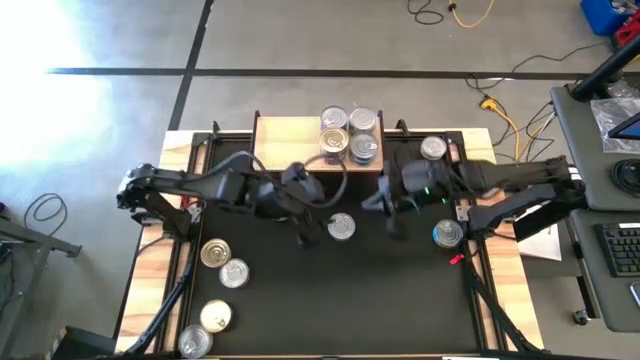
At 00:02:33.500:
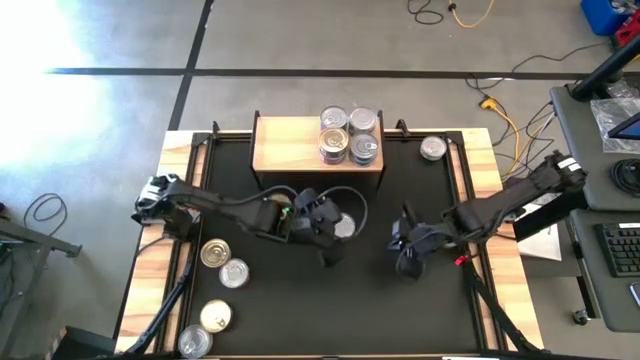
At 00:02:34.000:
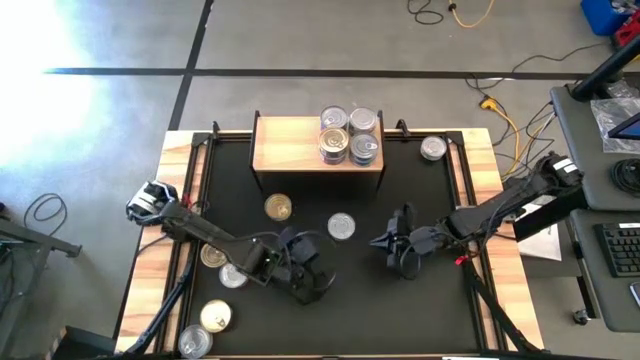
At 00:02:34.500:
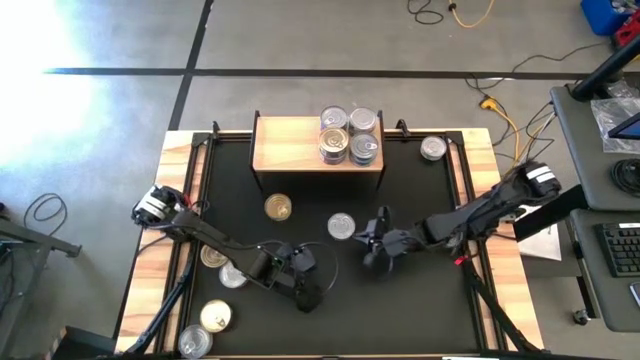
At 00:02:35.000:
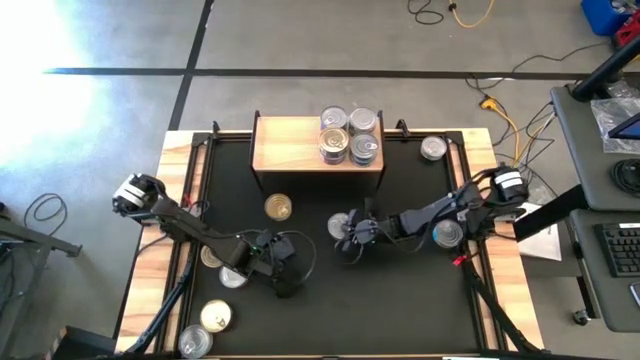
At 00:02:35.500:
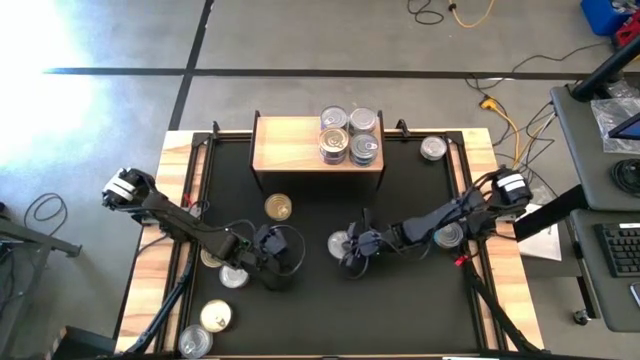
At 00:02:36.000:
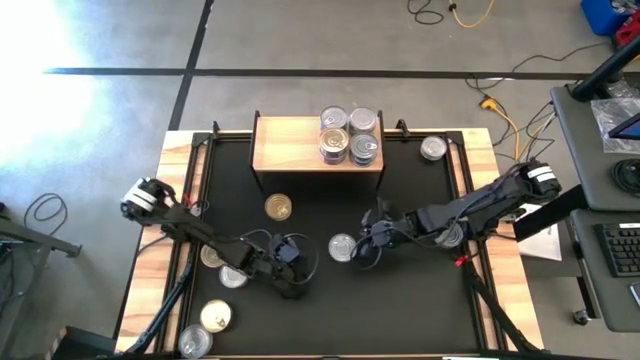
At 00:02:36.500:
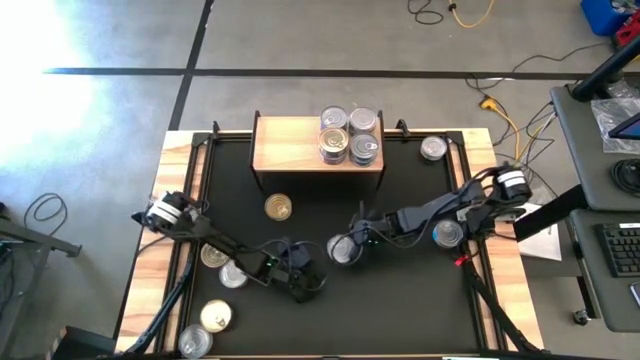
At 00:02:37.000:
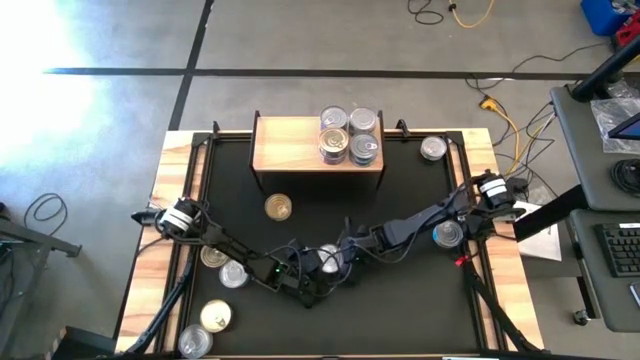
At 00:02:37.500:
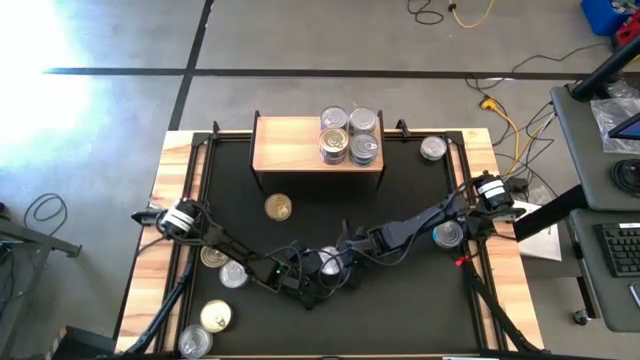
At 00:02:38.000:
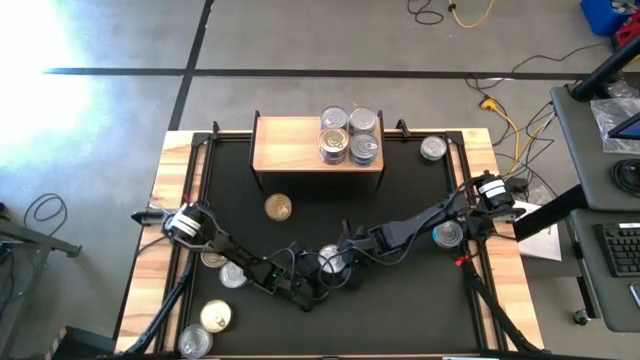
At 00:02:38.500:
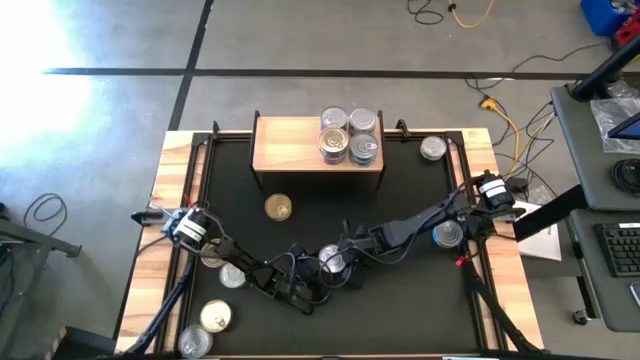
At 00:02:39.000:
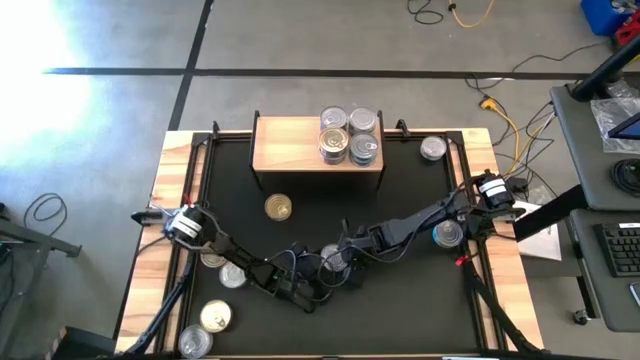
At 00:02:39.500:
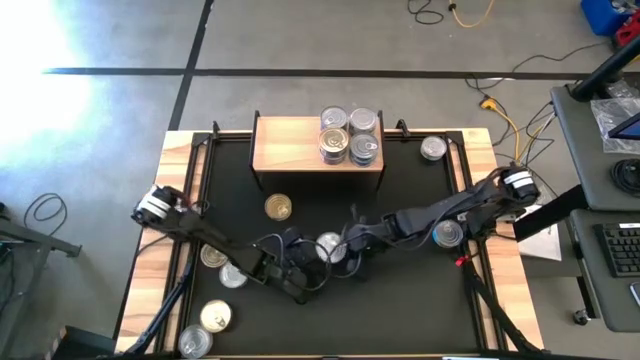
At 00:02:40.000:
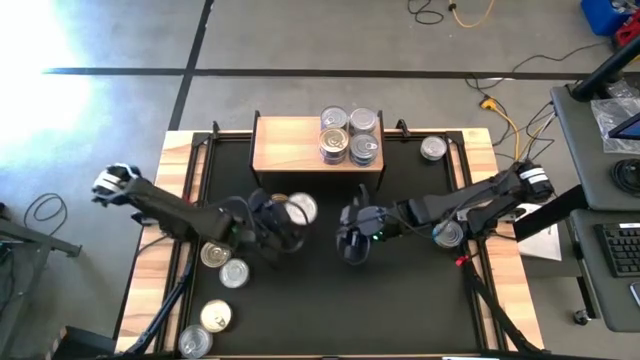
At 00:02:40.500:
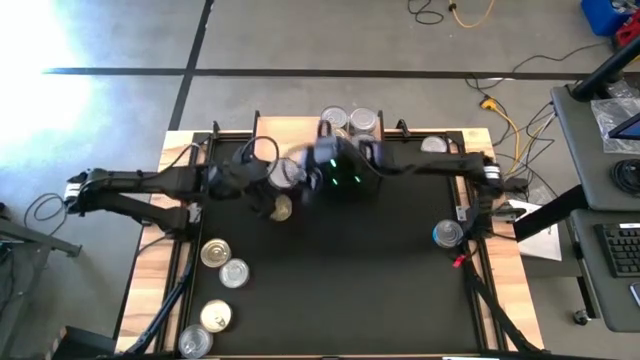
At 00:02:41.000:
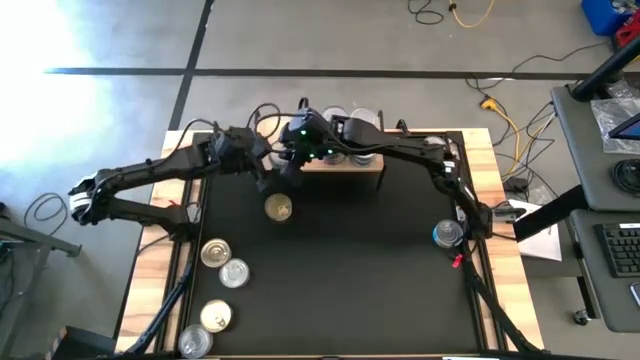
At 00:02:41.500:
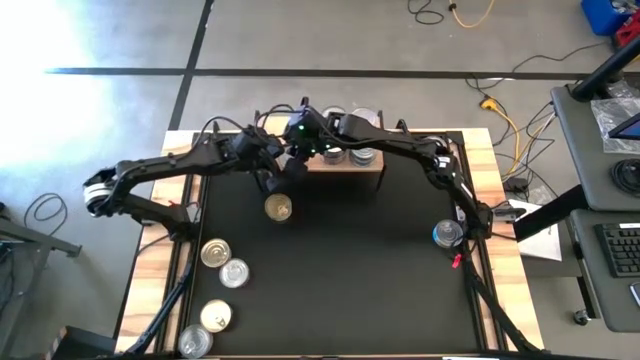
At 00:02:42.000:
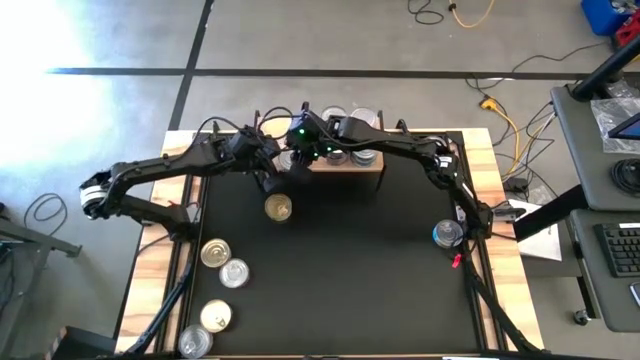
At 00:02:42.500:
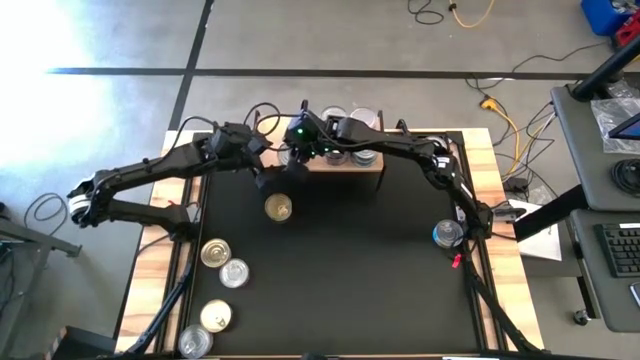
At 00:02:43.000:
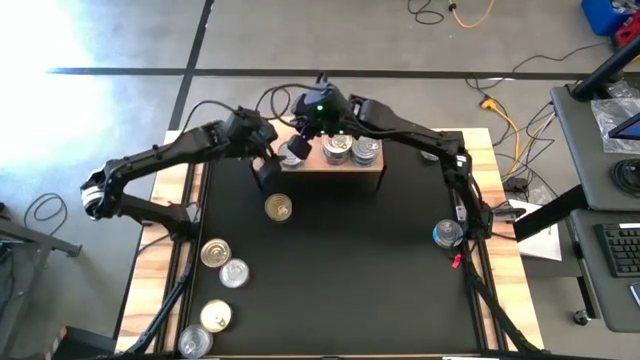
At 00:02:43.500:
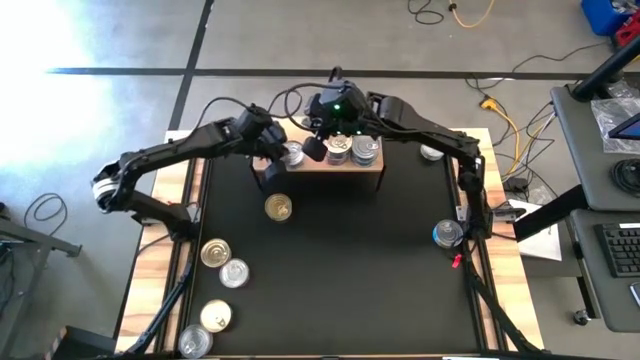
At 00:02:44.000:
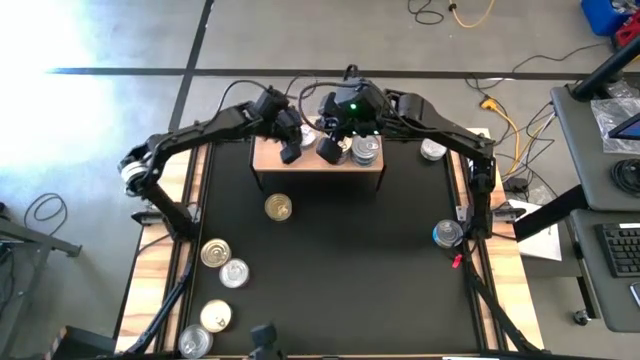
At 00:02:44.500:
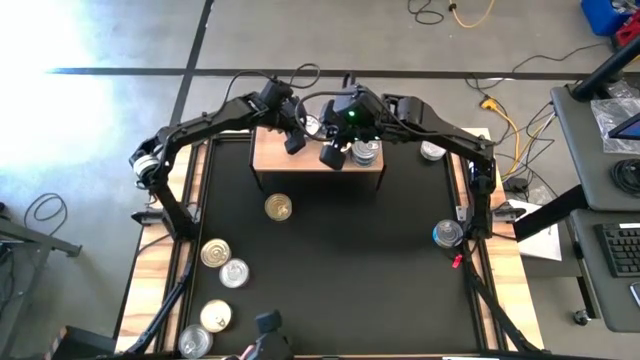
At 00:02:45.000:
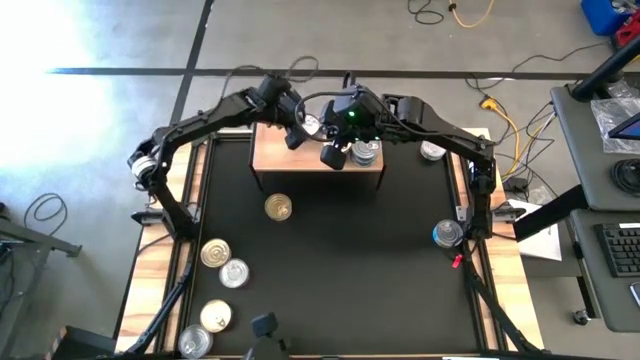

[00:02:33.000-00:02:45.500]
Task: Stack canned seafood by type on shelf
Put the right green tuna can on the shelf

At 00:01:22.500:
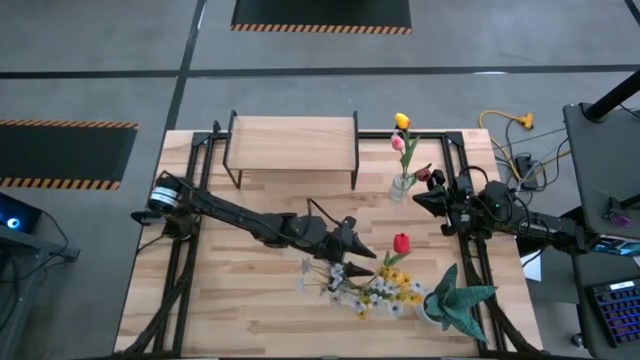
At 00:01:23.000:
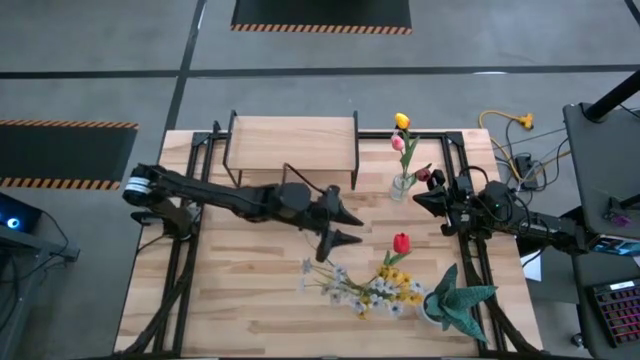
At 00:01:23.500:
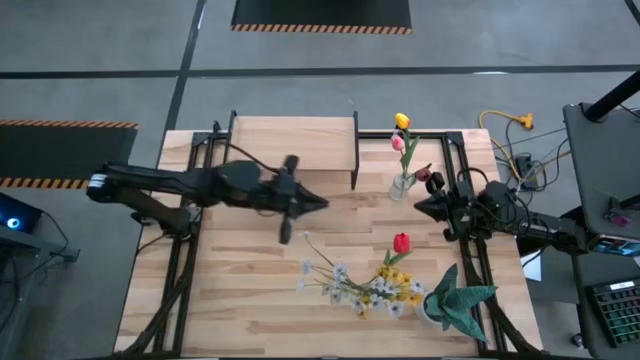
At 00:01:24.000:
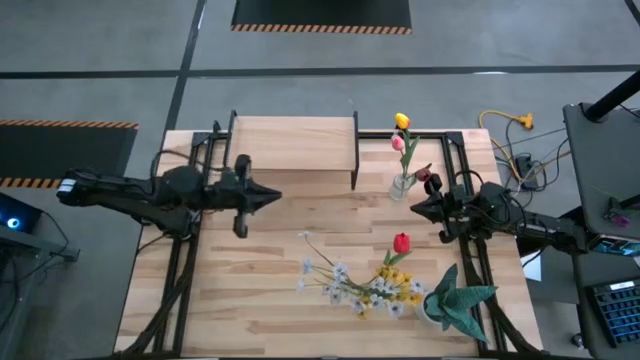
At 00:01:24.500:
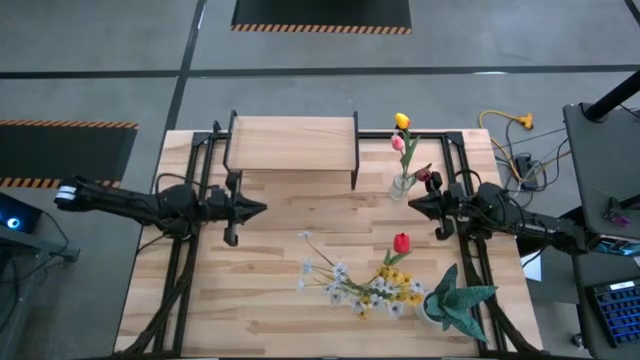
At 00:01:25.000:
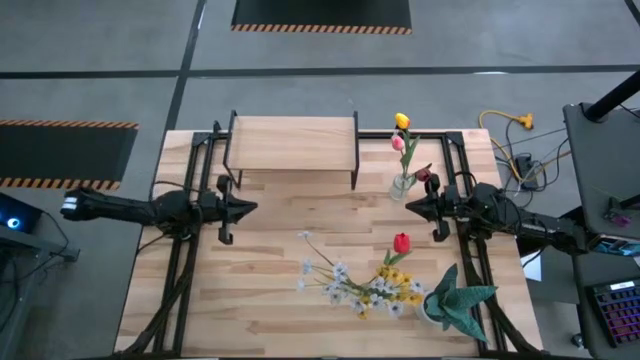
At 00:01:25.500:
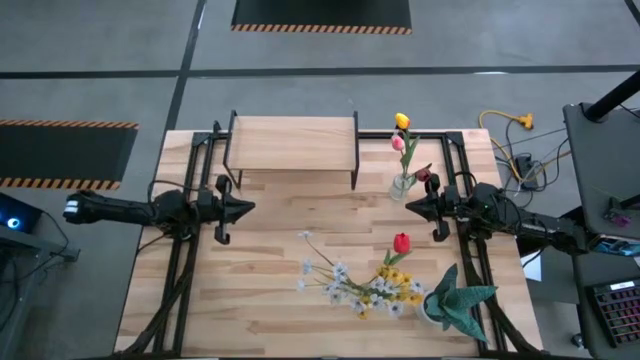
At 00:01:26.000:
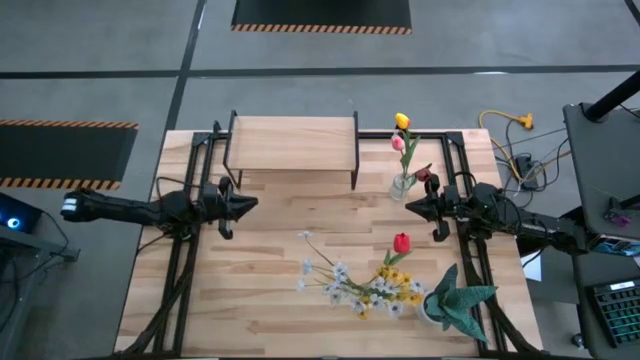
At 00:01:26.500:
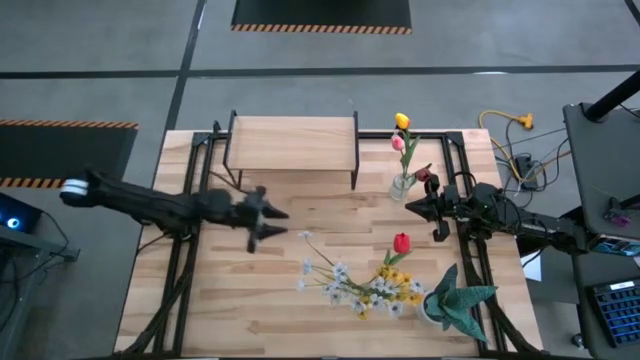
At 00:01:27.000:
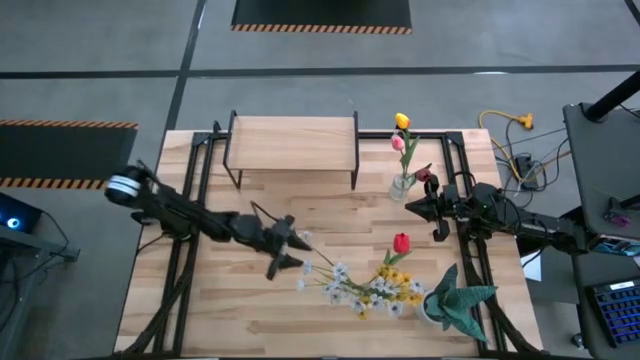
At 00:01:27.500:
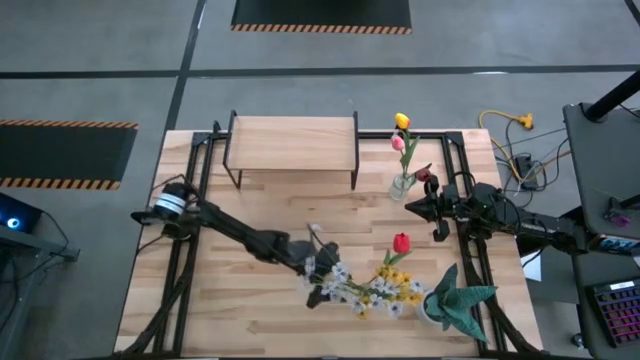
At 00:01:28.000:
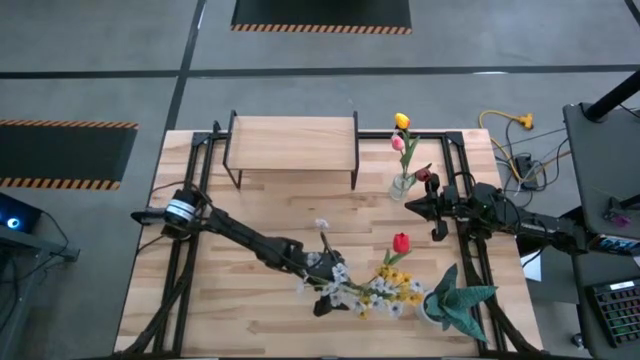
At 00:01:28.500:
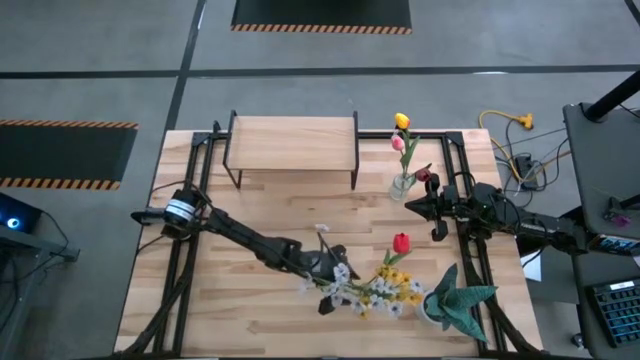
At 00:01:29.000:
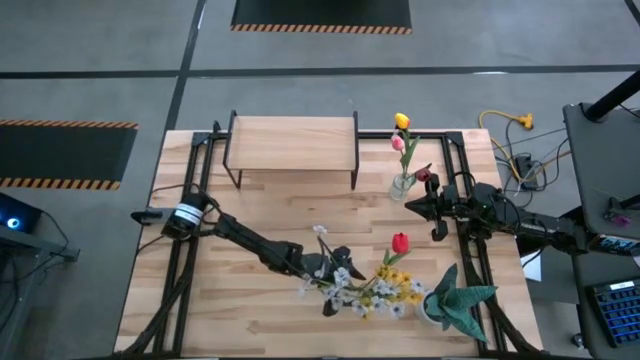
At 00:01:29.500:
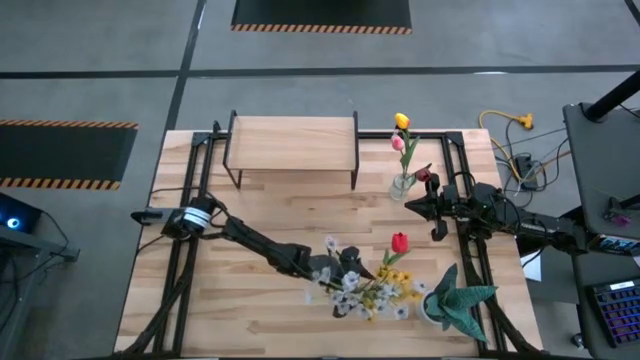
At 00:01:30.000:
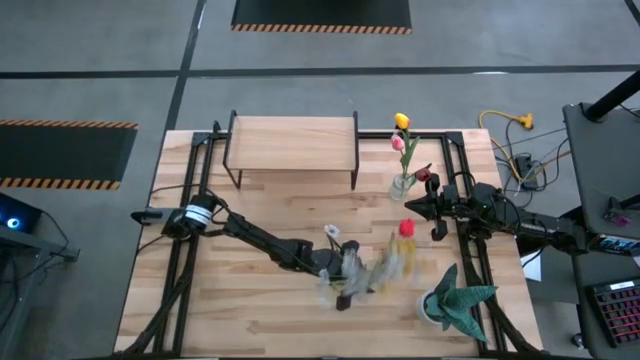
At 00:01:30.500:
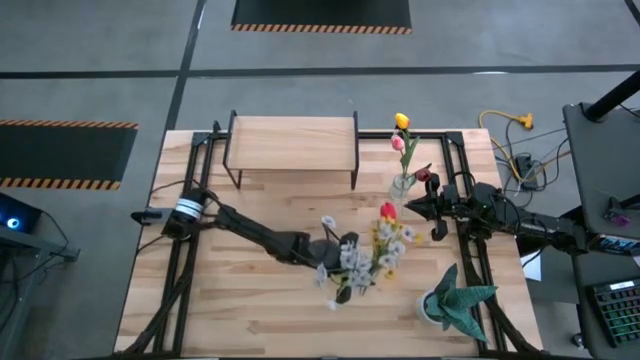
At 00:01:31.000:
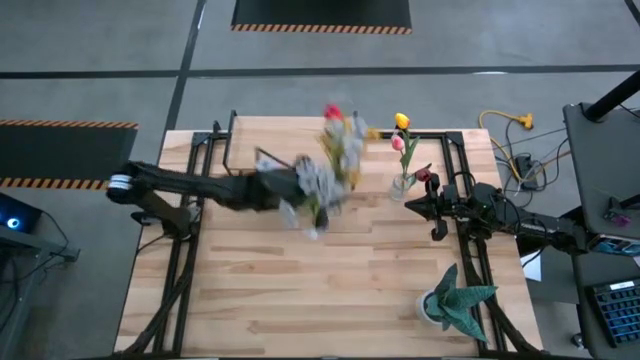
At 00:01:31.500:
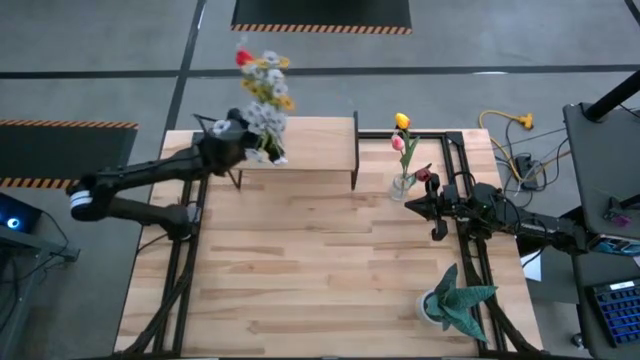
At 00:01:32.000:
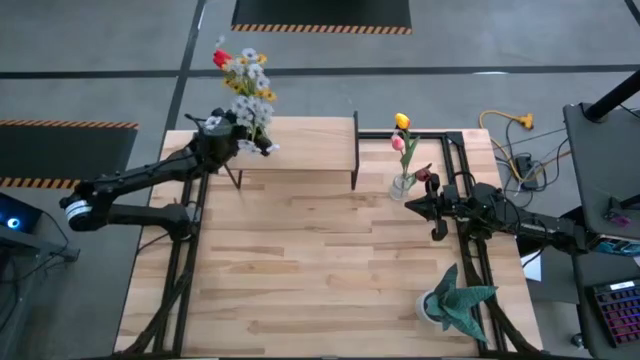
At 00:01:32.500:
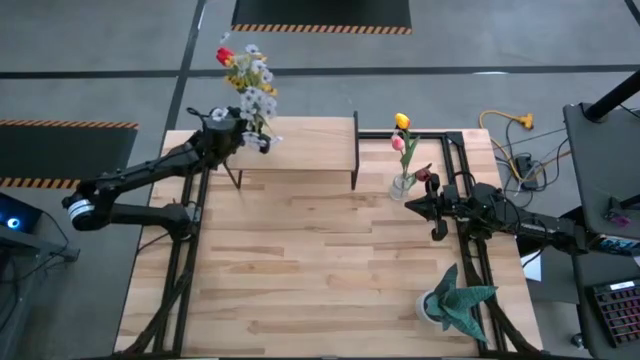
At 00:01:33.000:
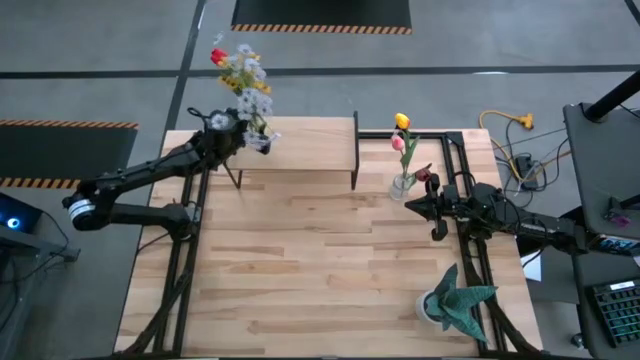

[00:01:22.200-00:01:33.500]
Task: Pick and place flowers into a vace then onto a shelf
Put the bottom transparent vase on the shelf
